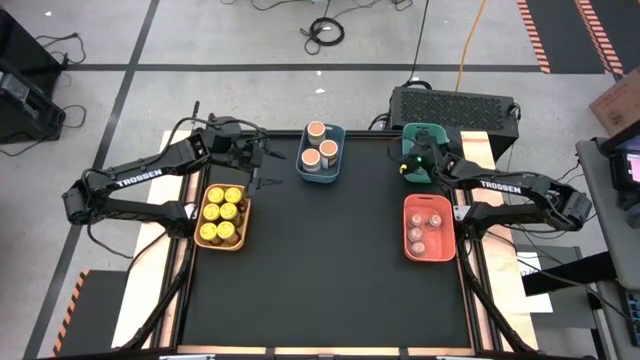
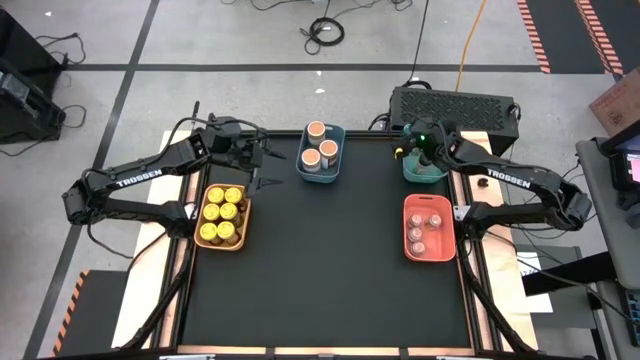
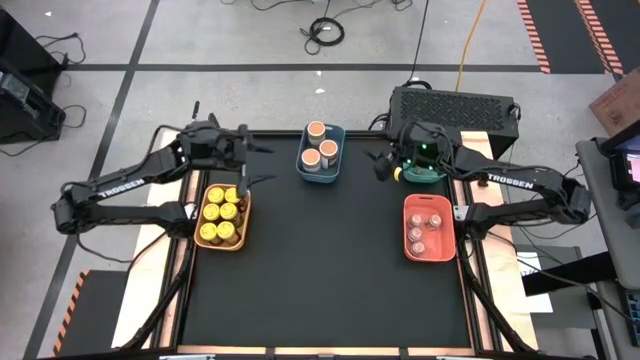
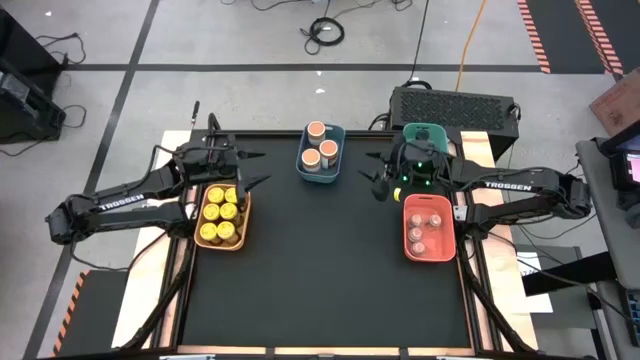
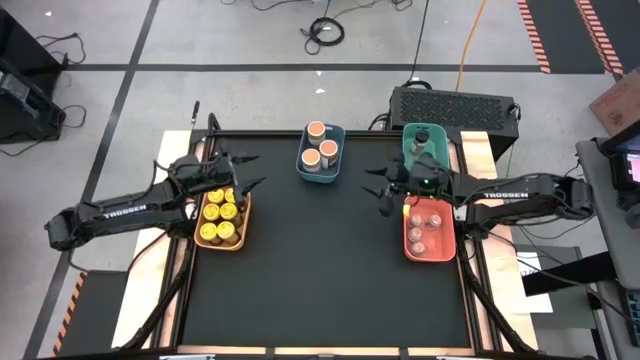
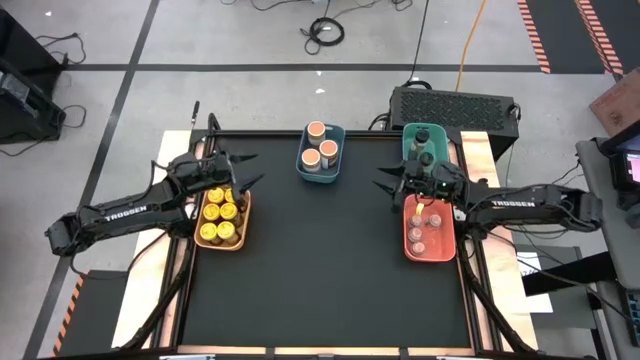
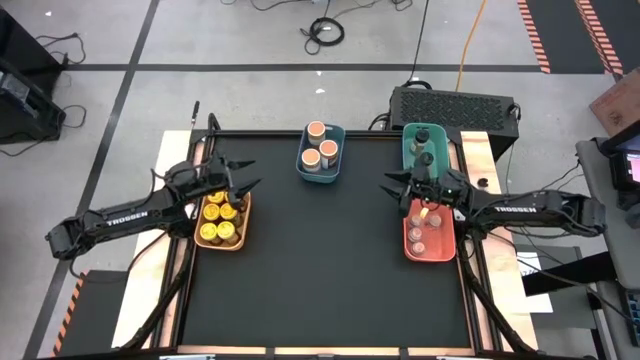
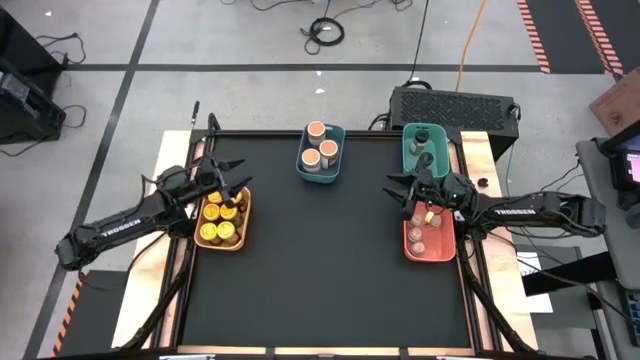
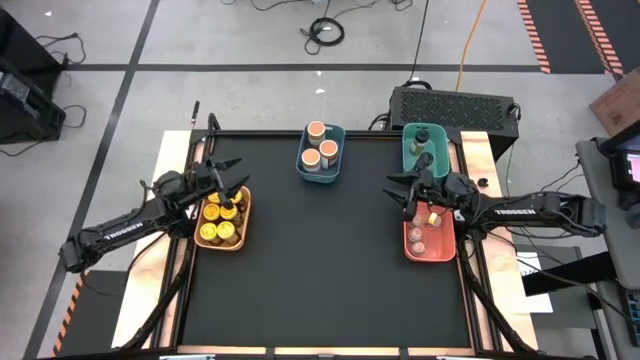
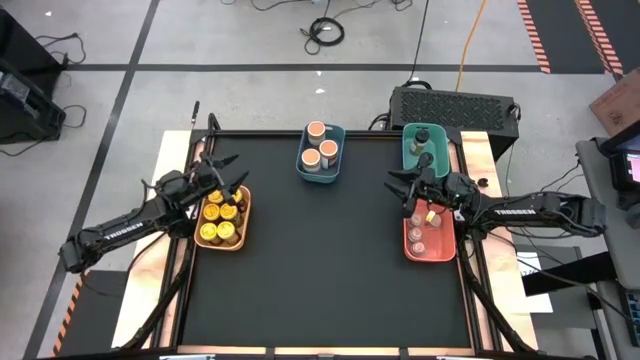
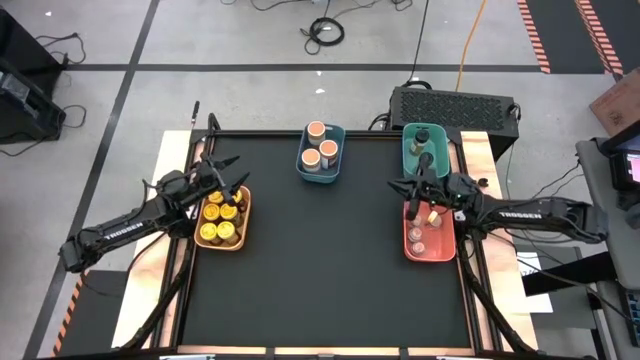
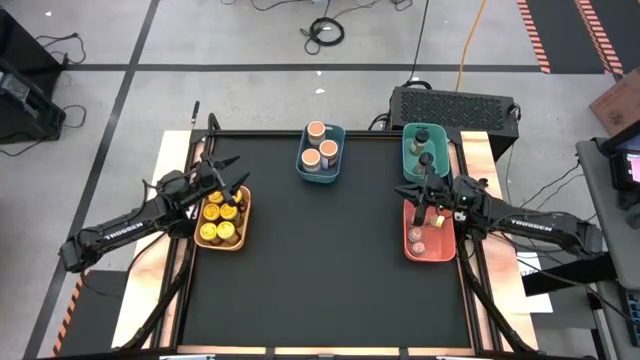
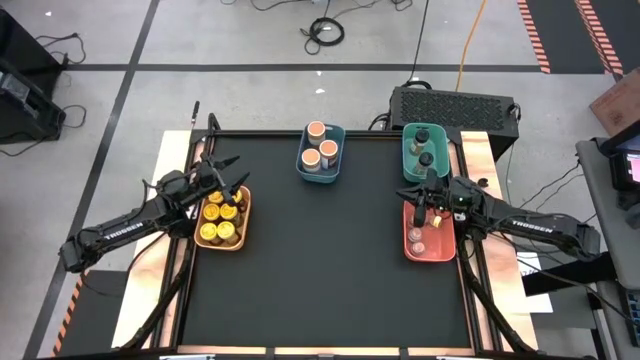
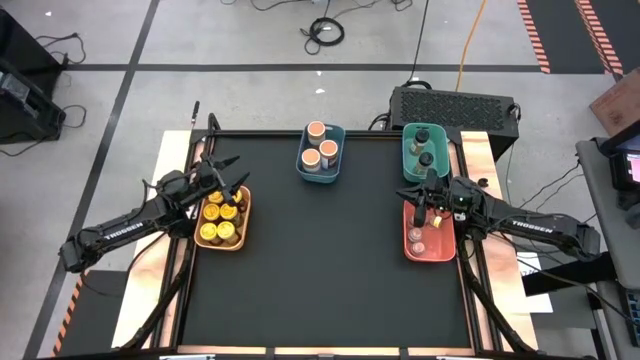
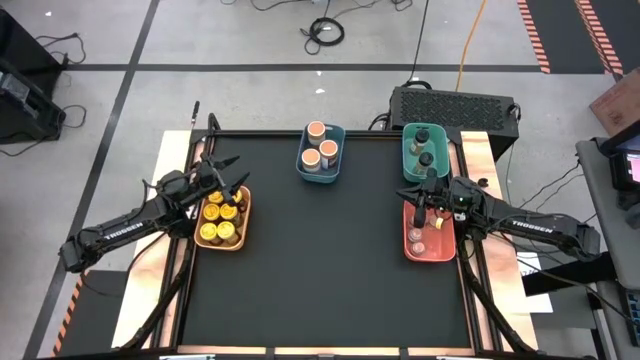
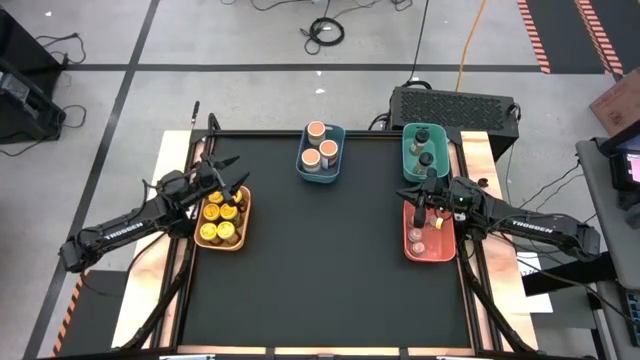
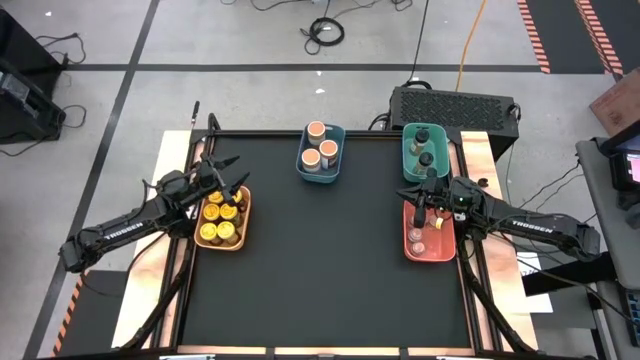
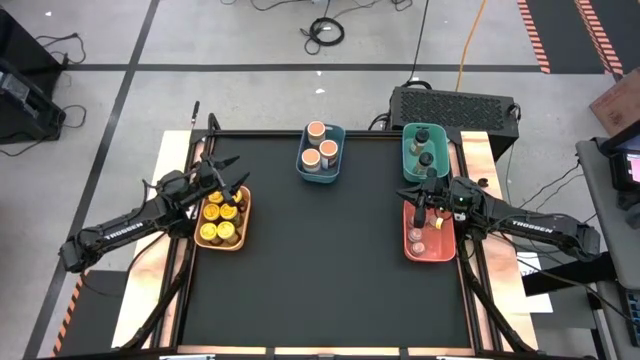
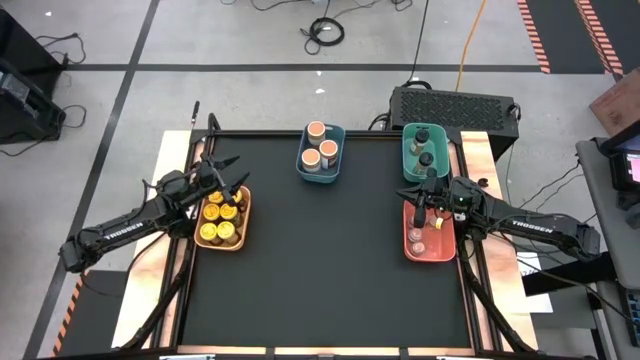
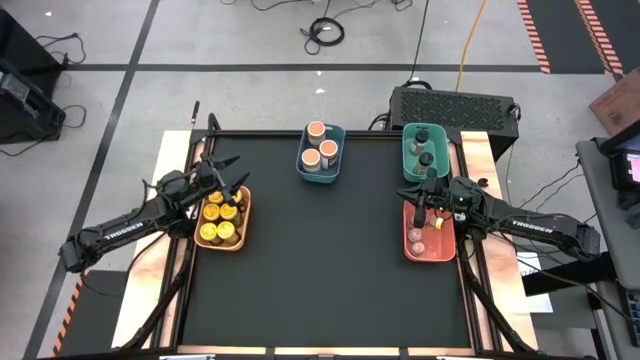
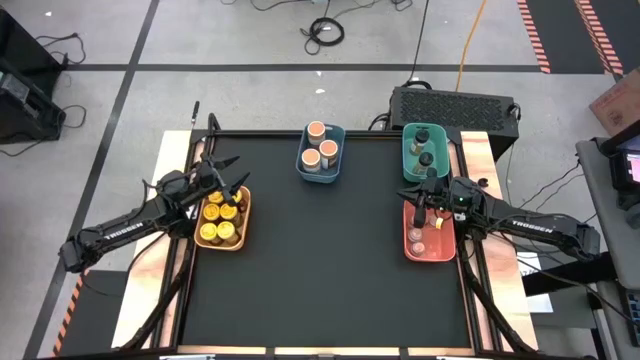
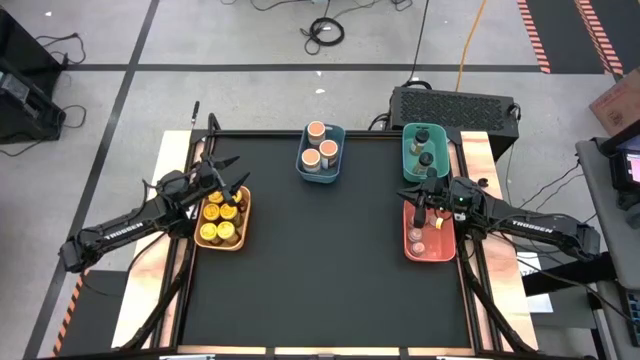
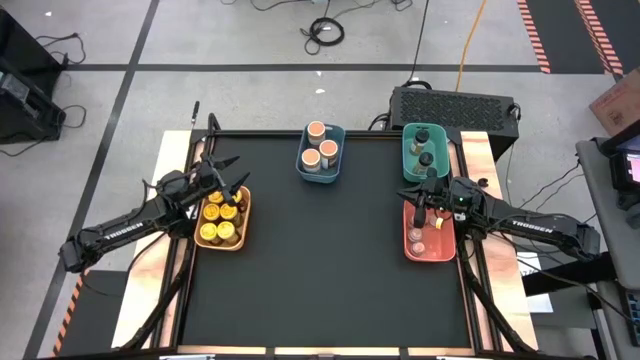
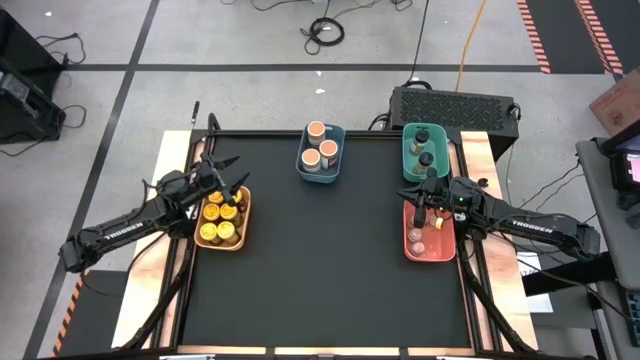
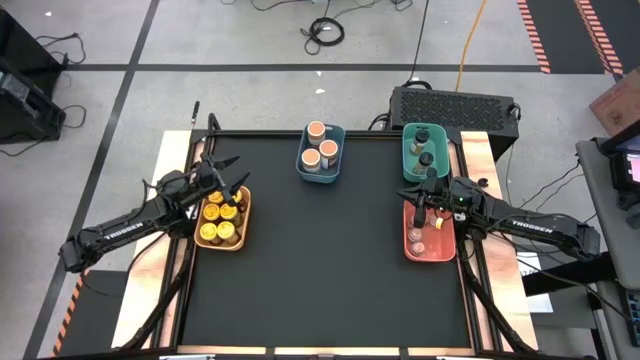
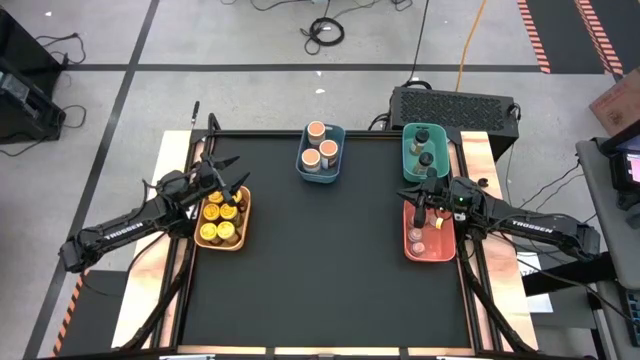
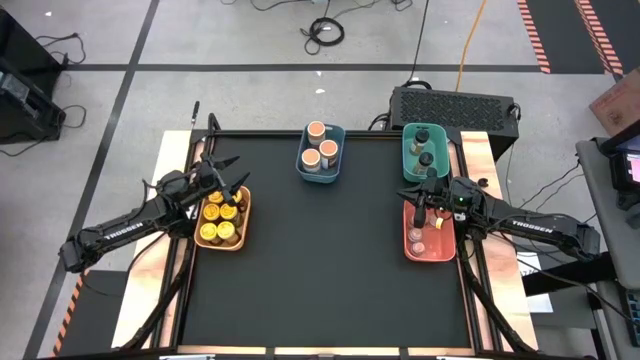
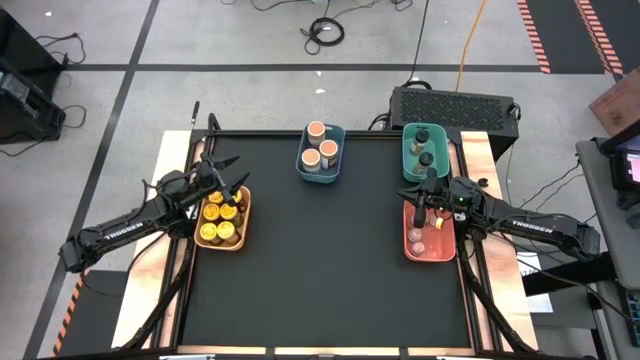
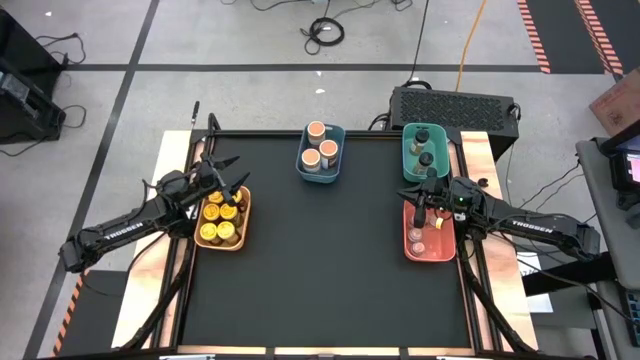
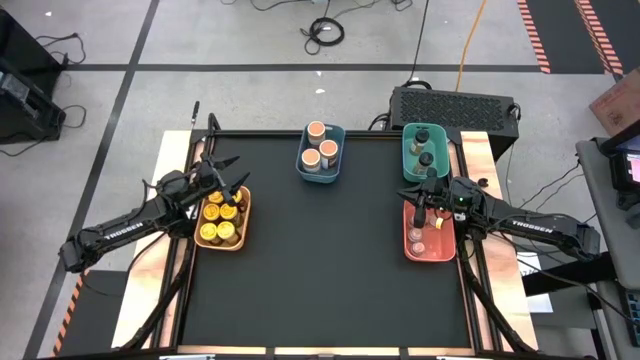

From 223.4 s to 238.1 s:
Task: Sort spices by type
Return to Home Position

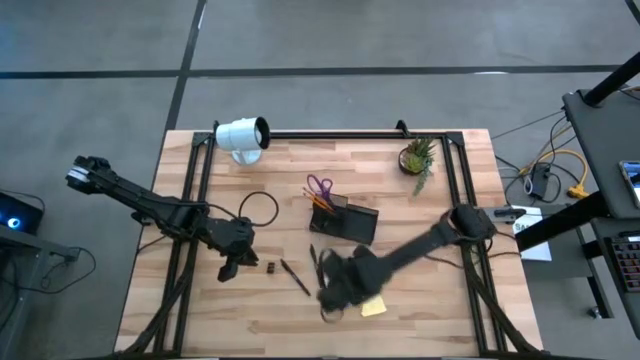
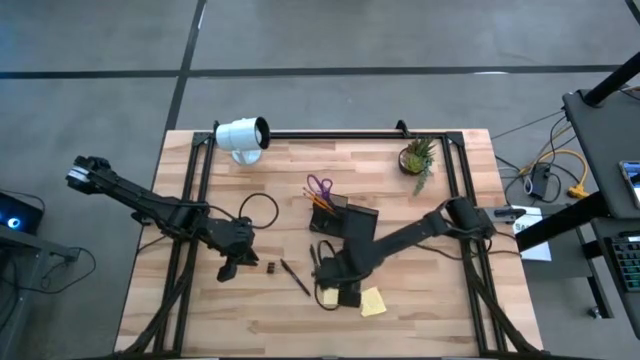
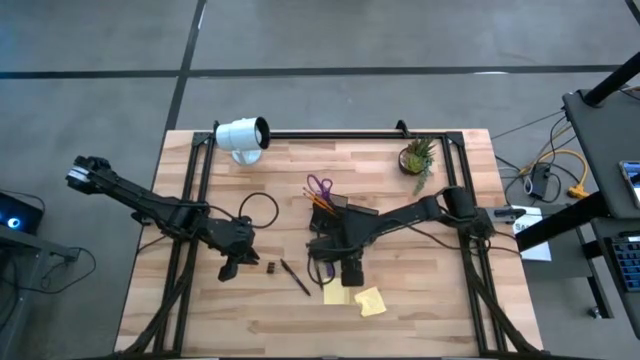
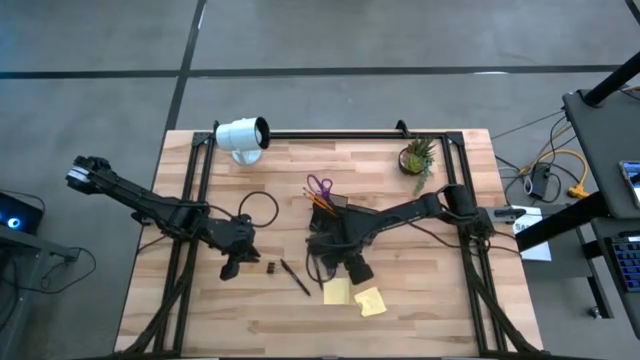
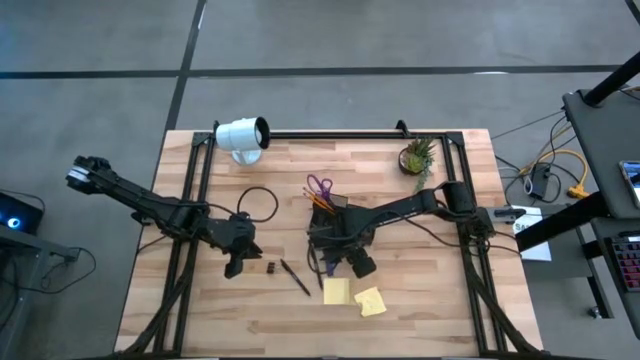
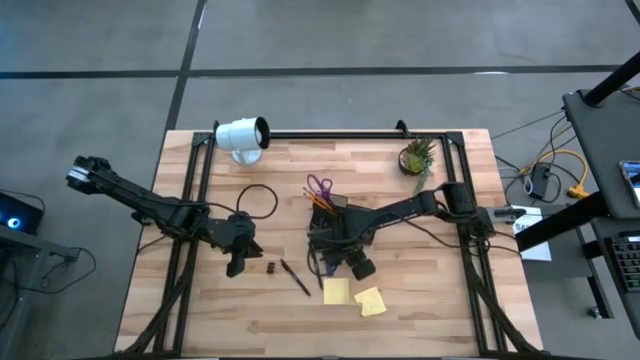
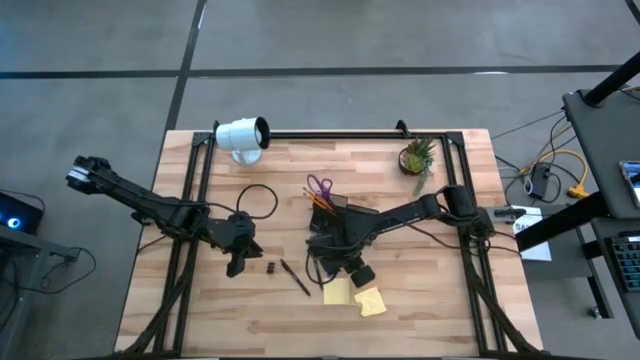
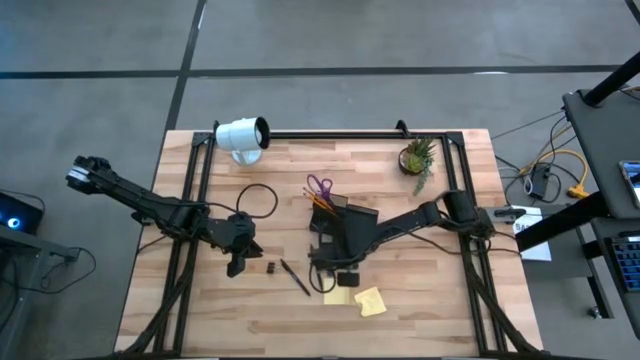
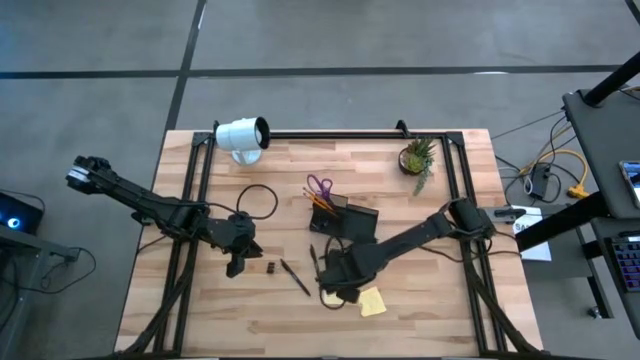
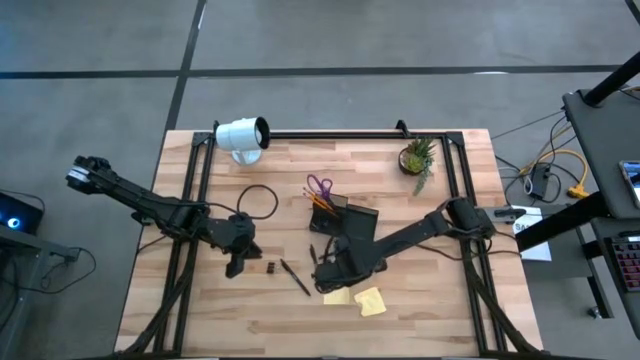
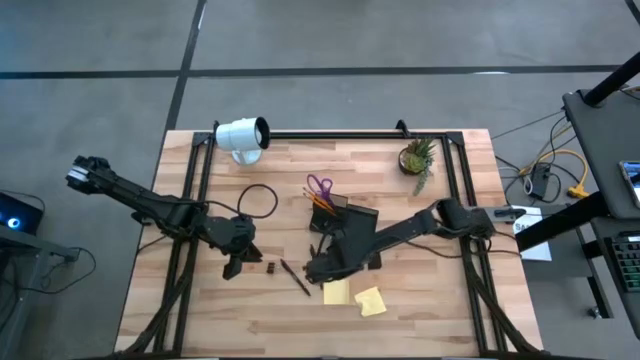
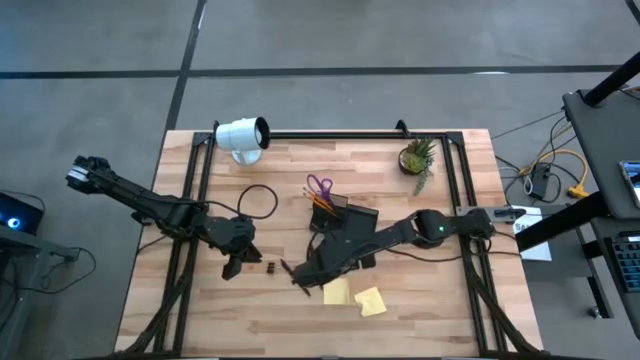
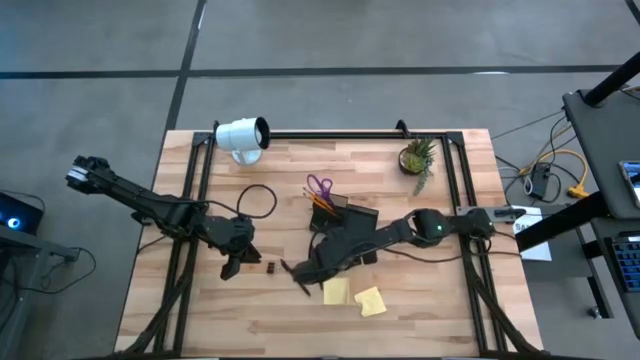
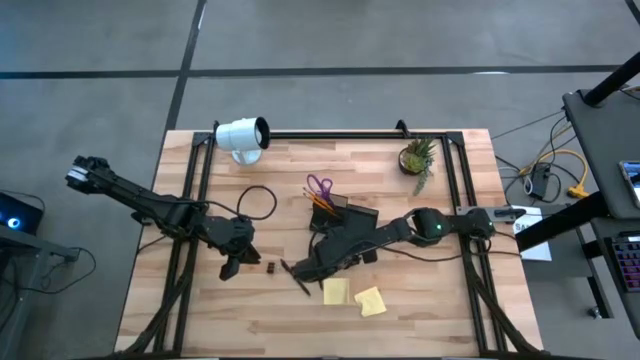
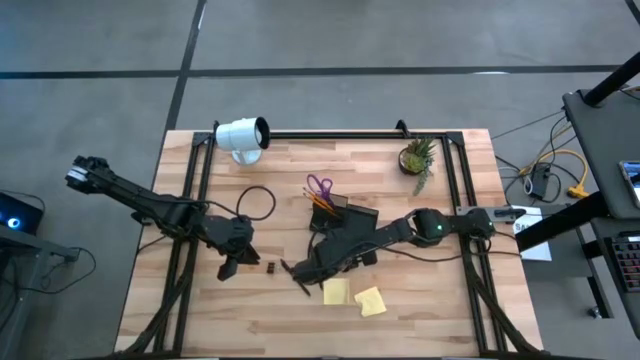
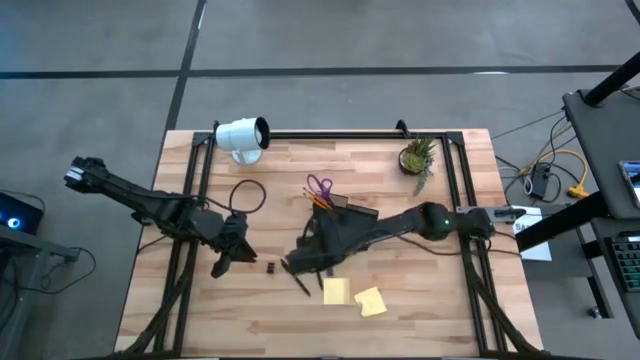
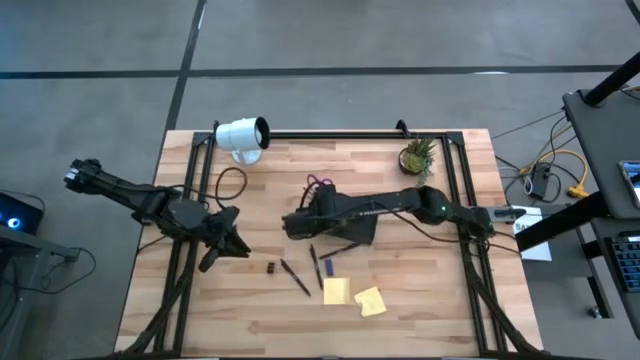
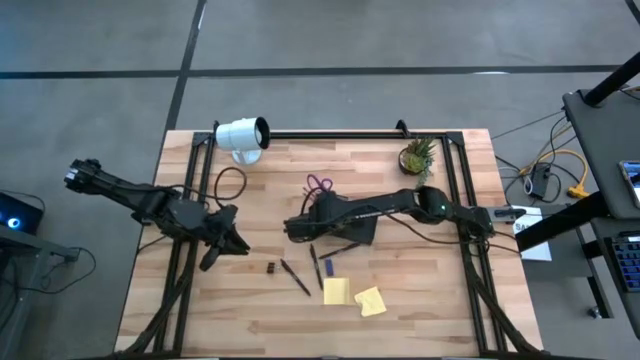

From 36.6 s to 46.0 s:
Task: Pick and place office supplies into organizer
Put the right black binder clip into the black desk organizer
